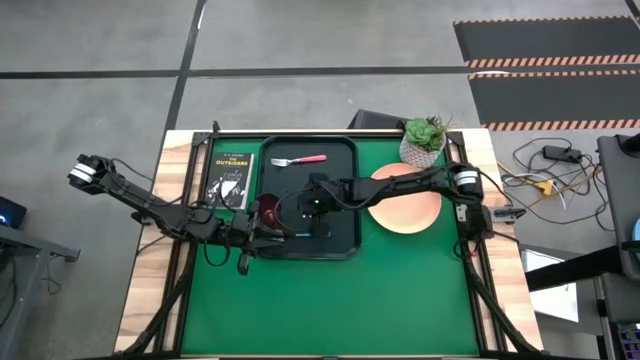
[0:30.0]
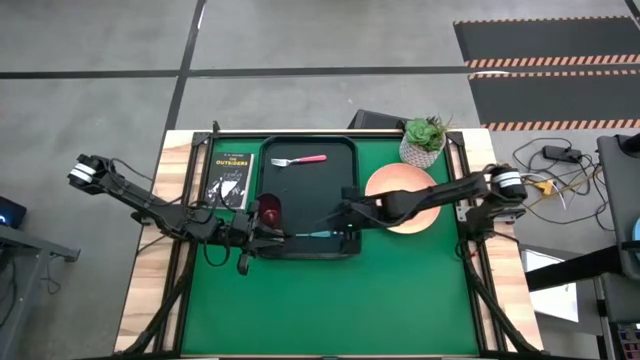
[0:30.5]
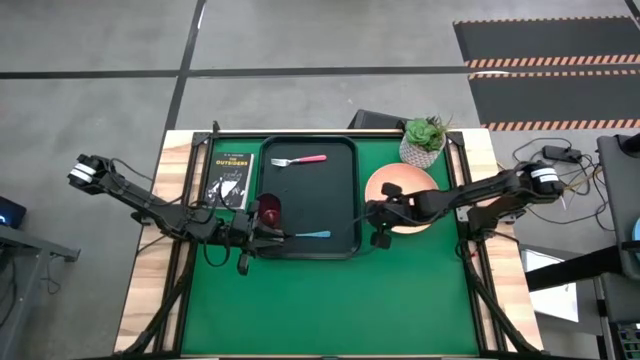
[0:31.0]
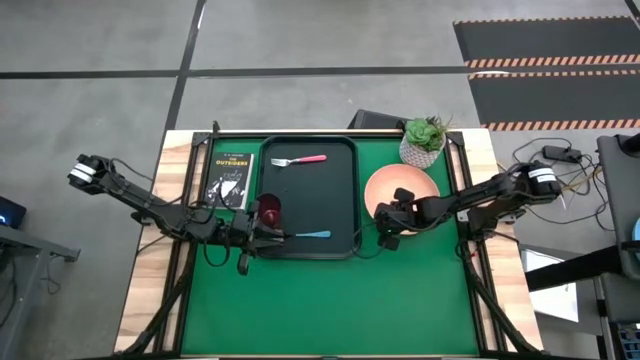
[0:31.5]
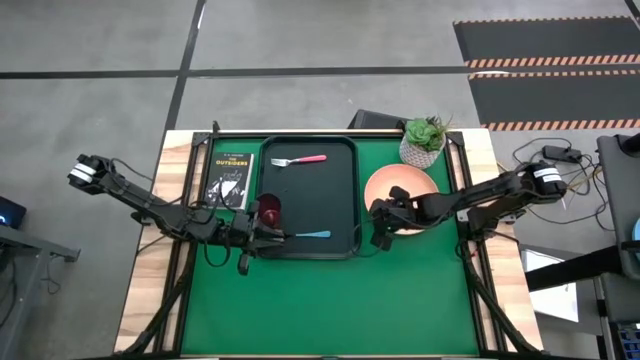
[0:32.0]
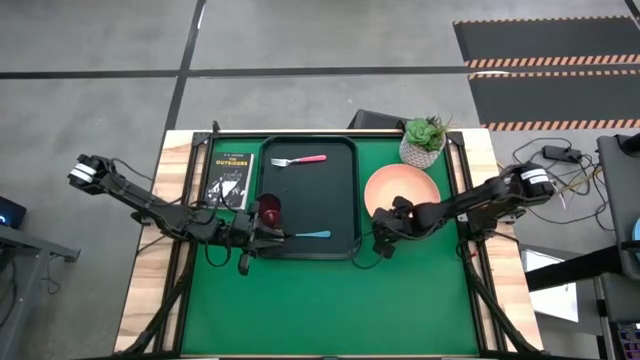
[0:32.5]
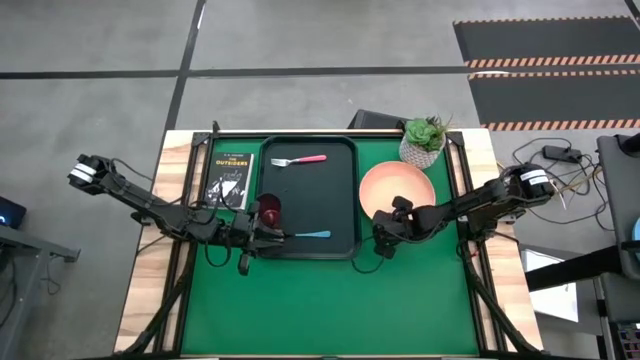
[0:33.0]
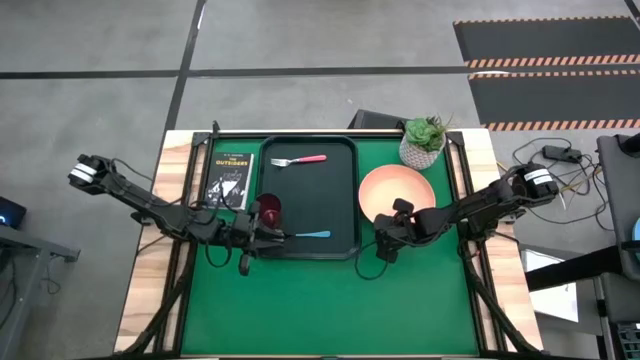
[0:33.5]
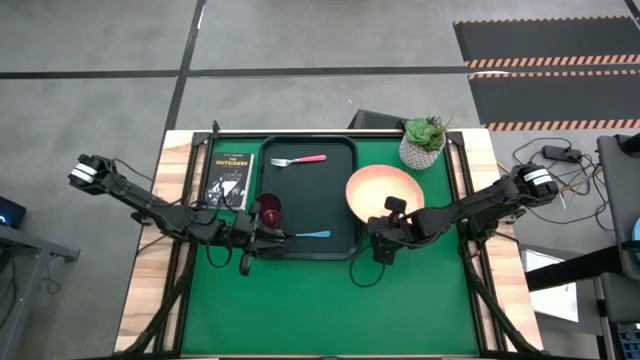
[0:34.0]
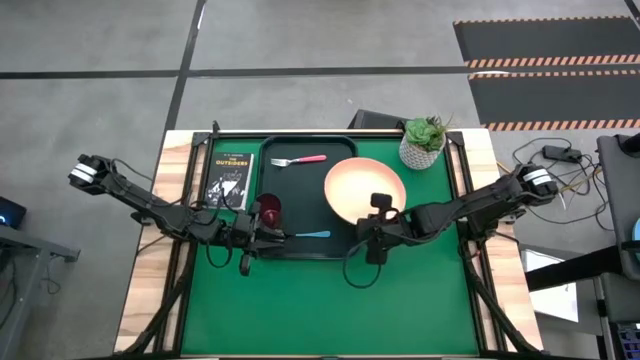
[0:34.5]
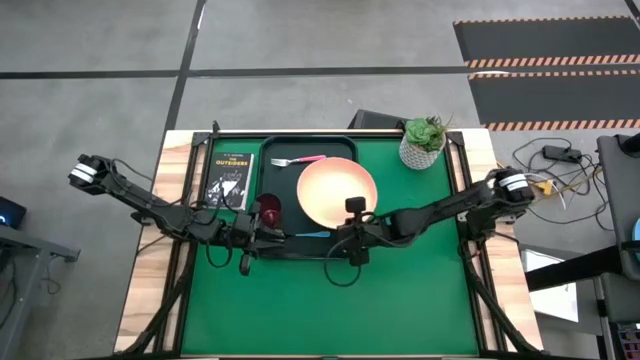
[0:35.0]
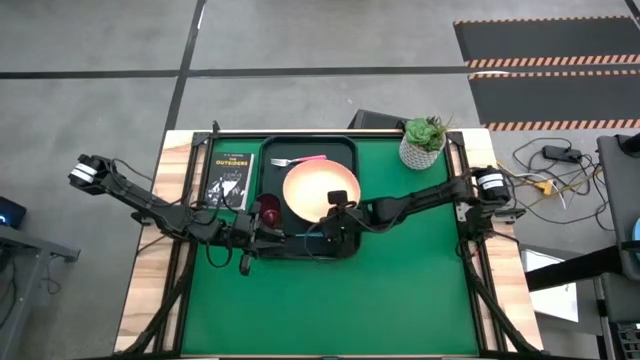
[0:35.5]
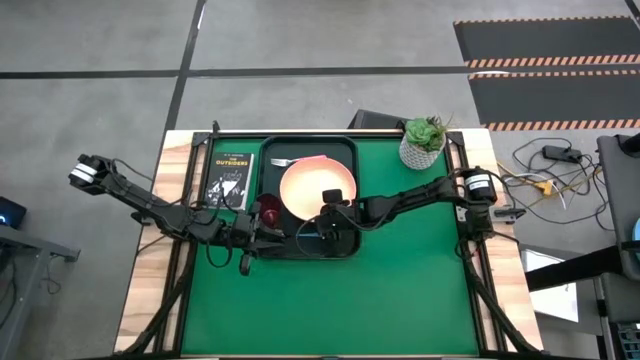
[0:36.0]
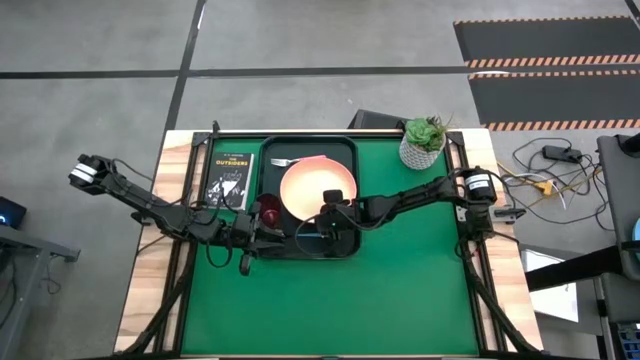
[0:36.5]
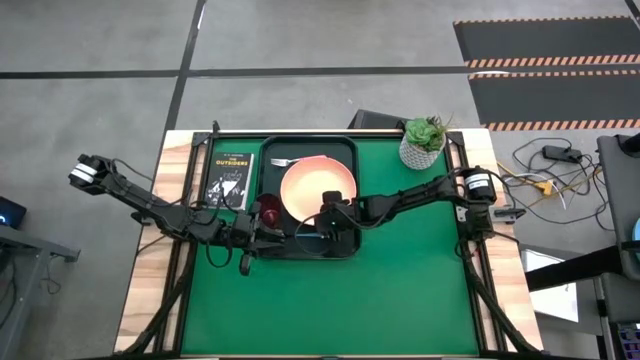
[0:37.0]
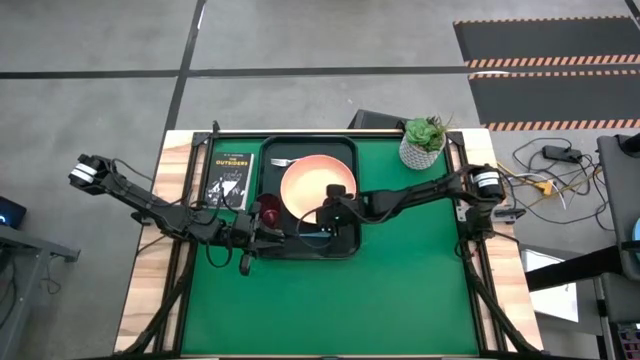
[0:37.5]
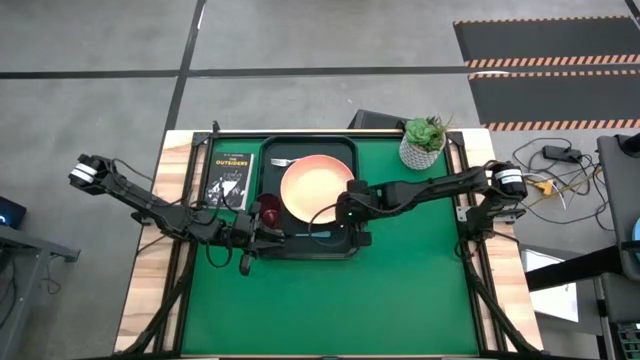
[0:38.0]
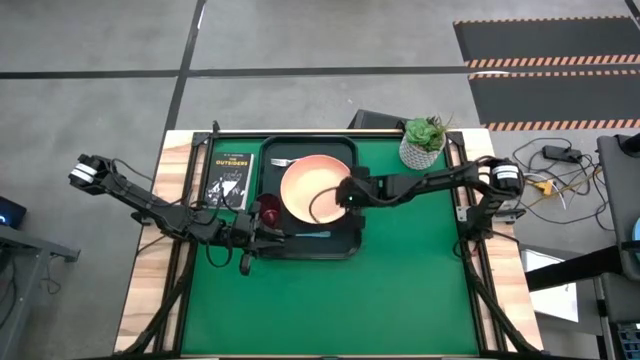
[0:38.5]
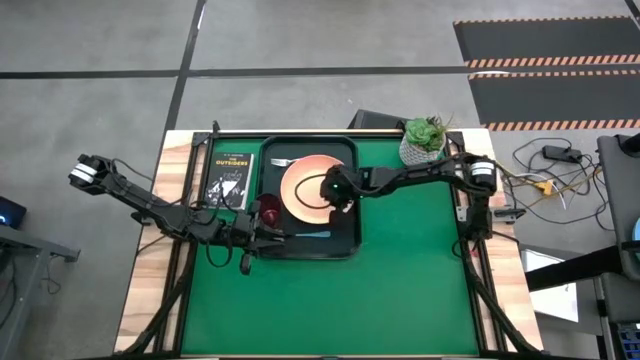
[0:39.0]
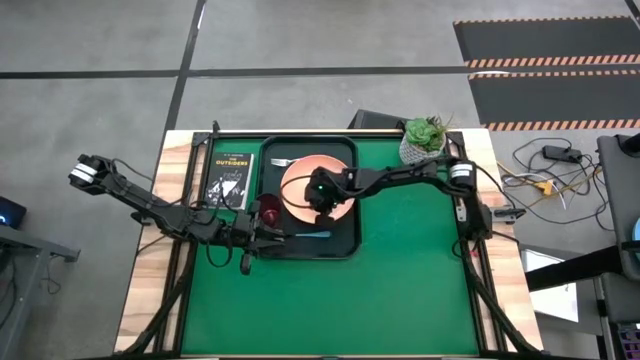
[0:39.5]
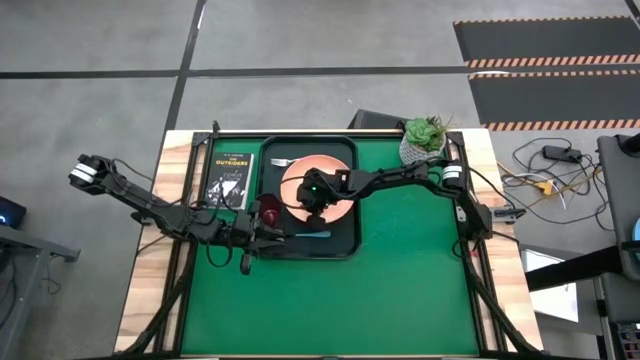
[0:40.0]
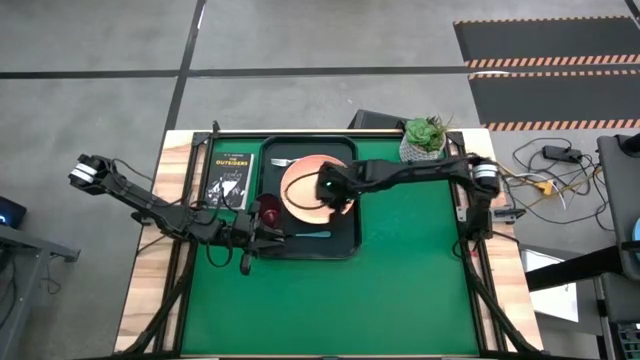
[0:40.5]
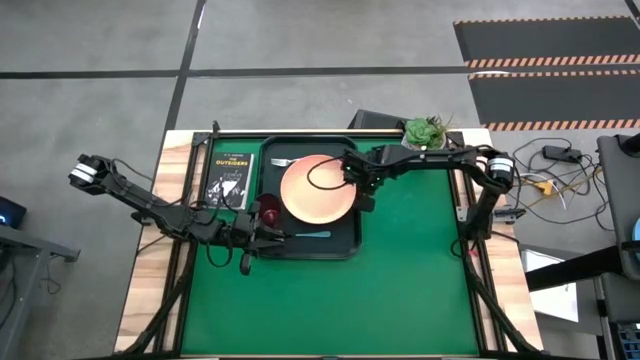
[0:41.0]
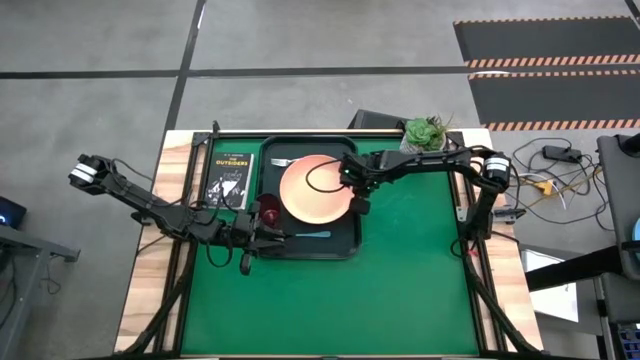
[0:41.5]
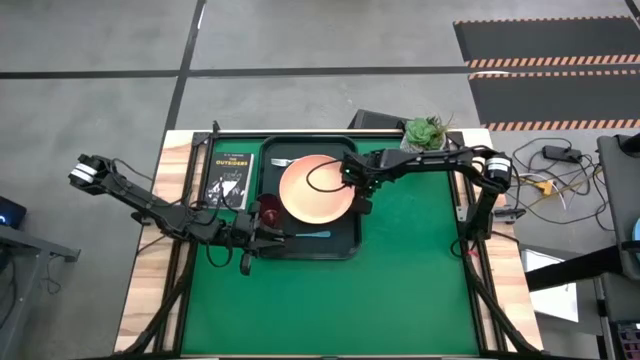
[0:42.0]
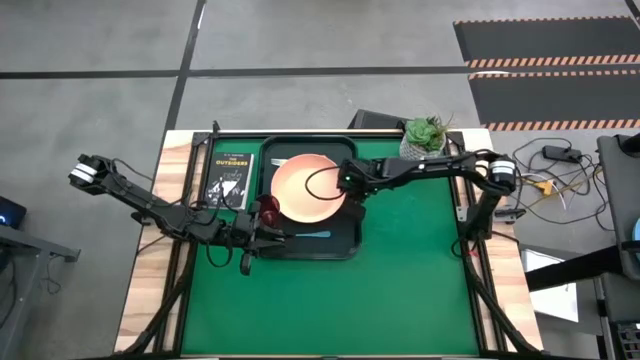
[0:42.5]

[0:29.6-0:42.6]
Task: Pick and place plate/cup/fork/spoon on tray
Put the orange plate on the center of the black serving tray

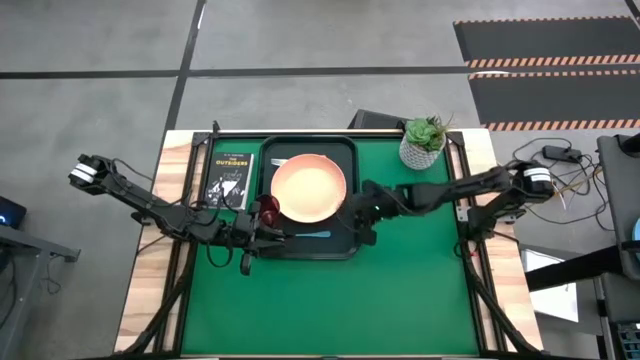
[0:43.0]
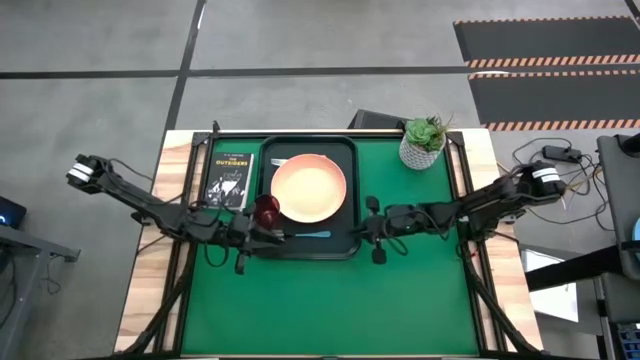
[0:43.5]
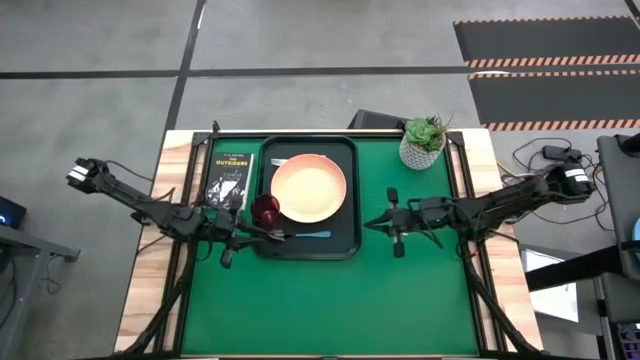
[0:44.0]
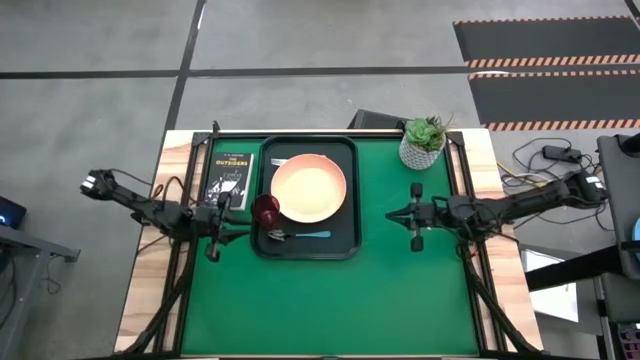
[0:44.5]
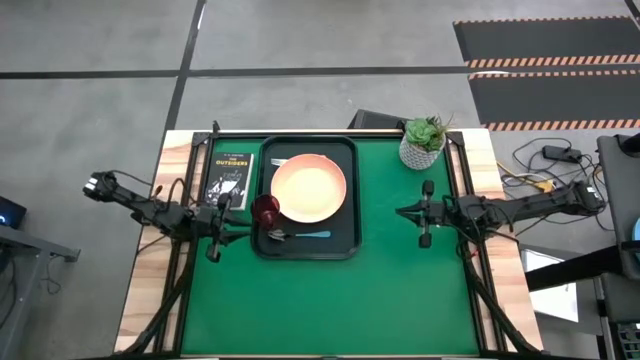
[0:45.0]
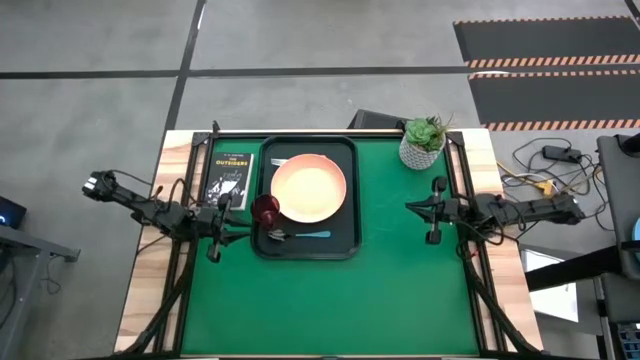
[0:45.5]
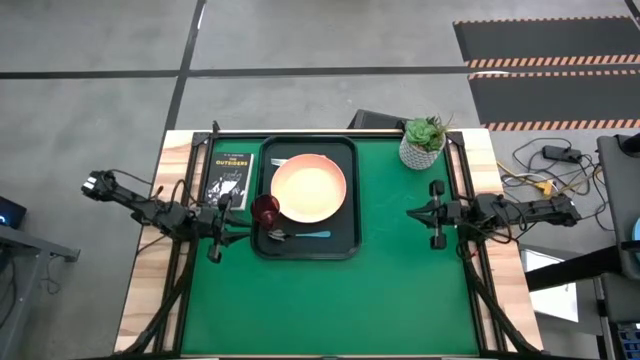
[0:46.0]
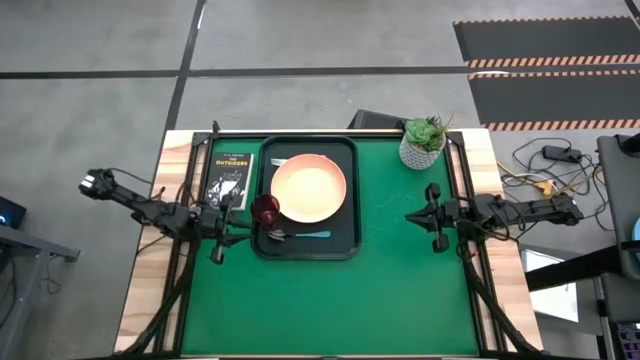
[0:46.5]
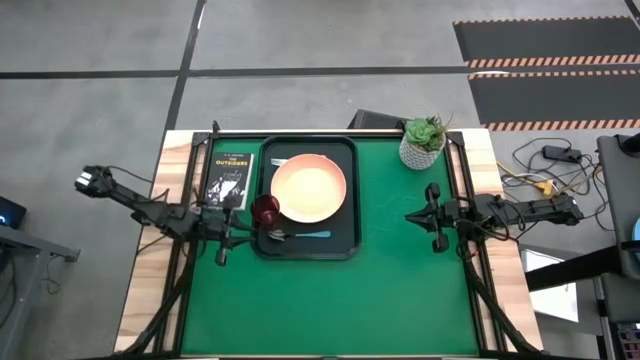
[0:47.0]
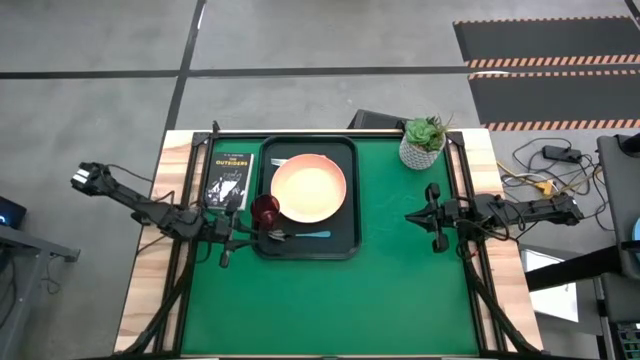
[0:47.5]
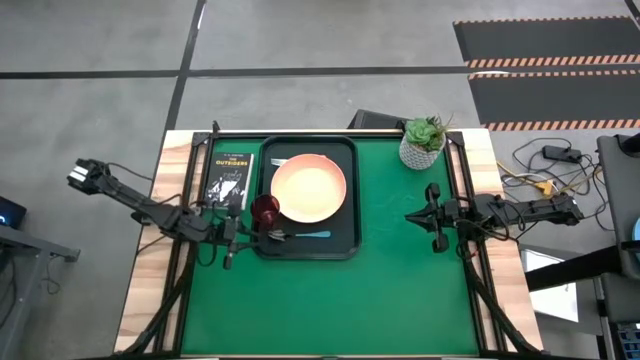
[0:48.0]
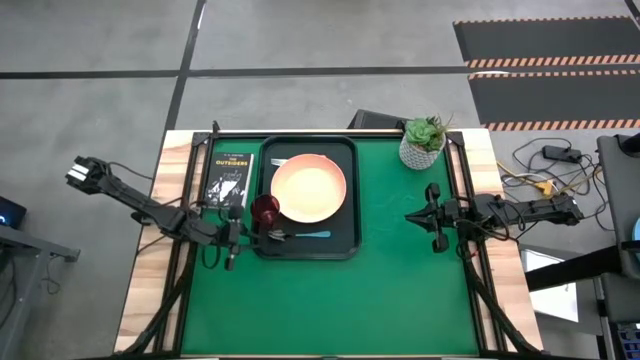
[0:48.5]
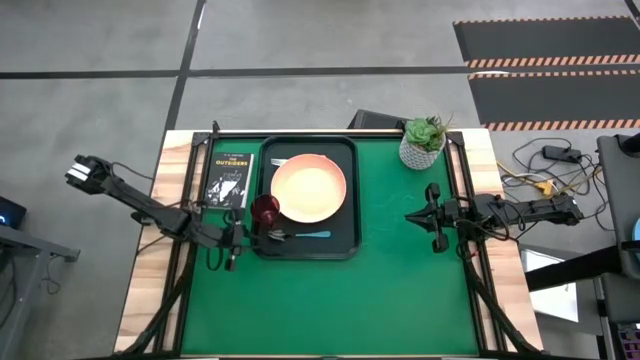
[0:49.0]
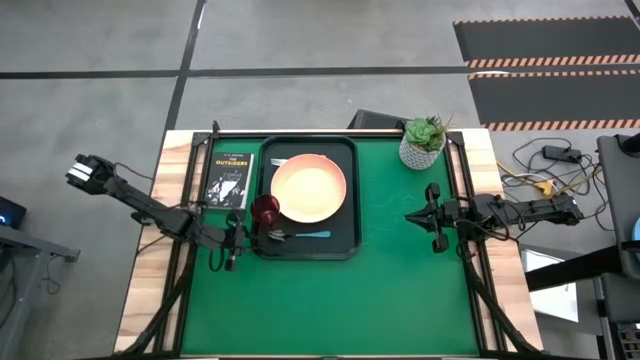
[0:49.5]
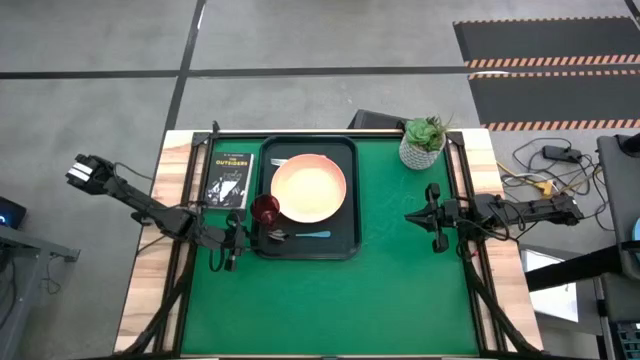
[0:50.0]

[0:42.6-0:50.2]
Return to Home Position
